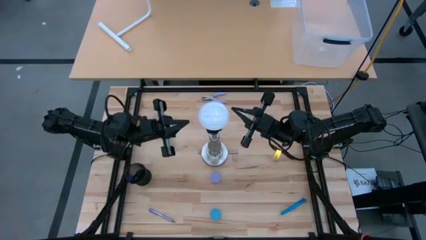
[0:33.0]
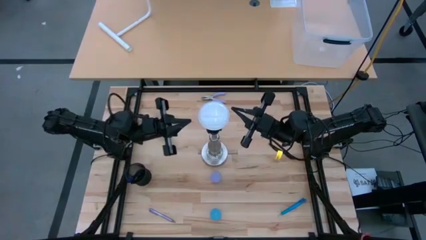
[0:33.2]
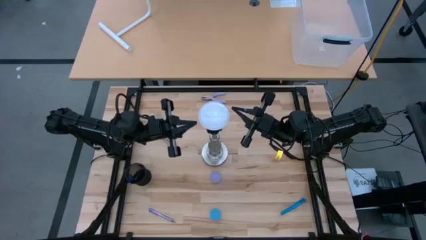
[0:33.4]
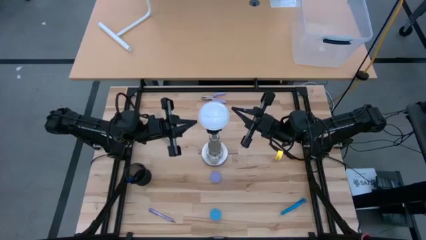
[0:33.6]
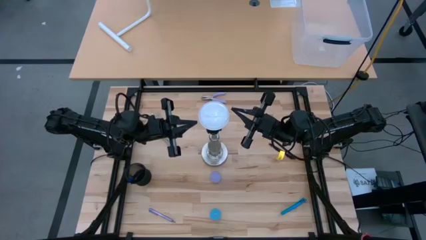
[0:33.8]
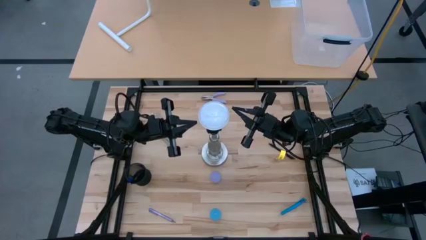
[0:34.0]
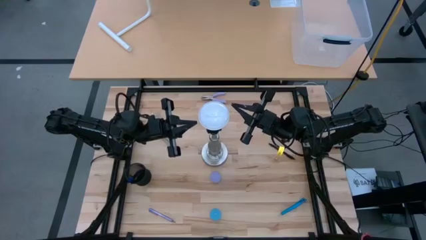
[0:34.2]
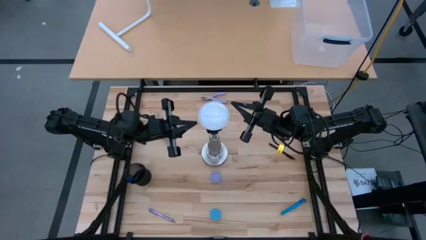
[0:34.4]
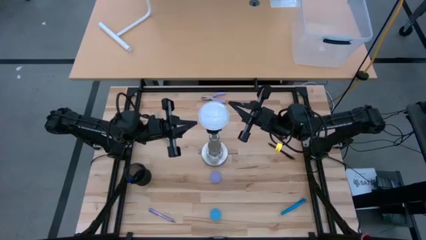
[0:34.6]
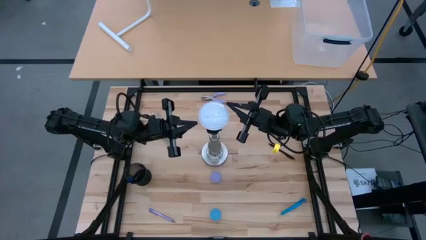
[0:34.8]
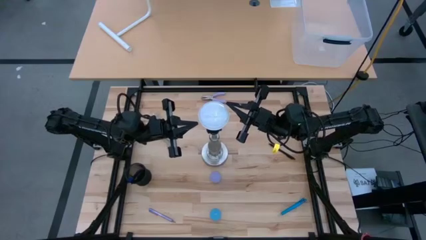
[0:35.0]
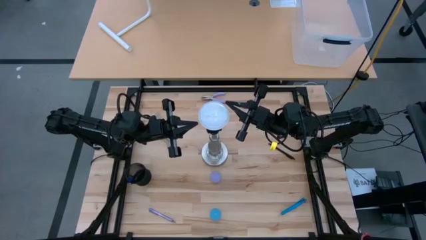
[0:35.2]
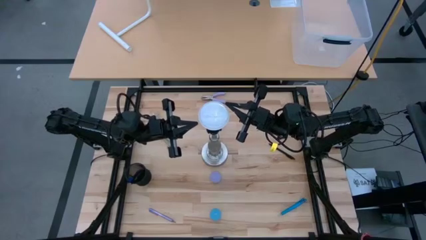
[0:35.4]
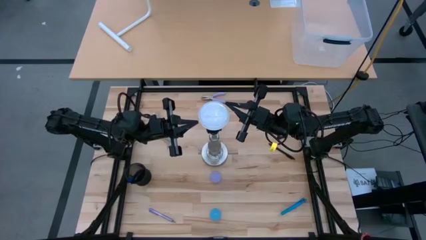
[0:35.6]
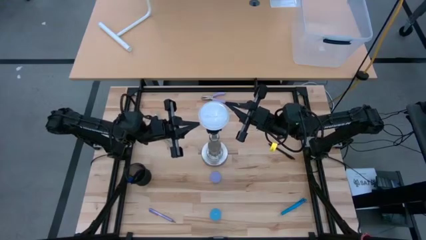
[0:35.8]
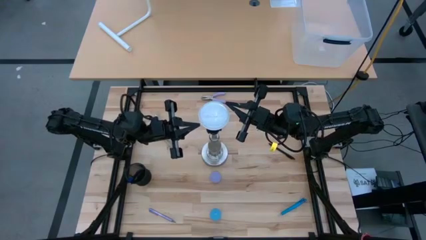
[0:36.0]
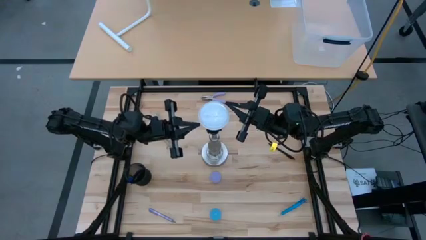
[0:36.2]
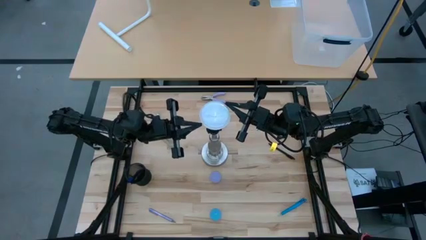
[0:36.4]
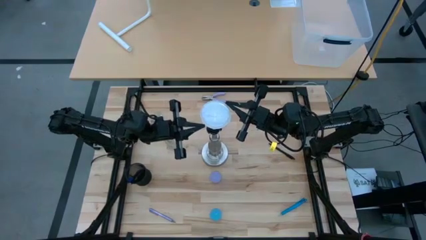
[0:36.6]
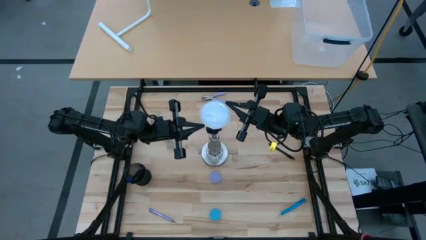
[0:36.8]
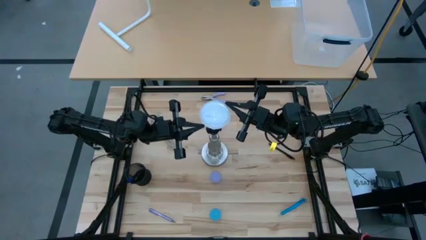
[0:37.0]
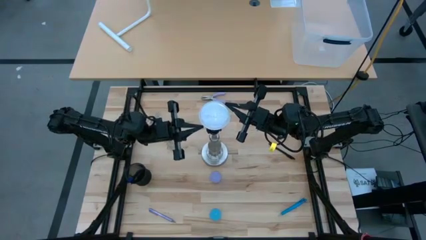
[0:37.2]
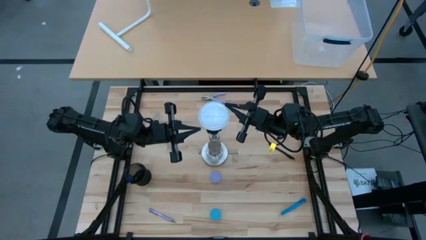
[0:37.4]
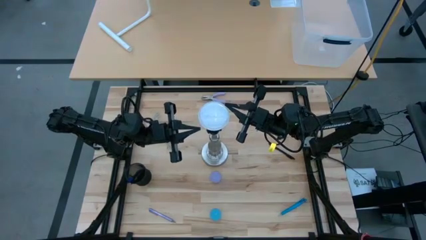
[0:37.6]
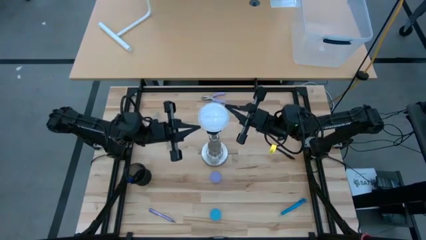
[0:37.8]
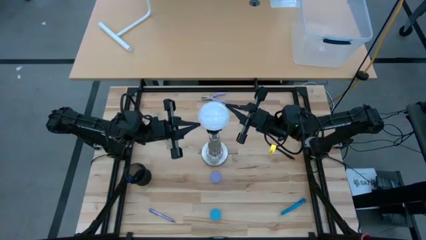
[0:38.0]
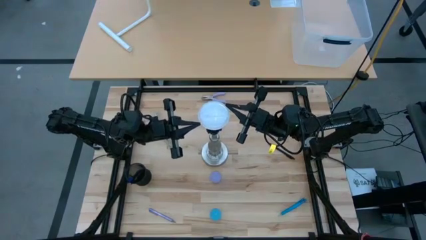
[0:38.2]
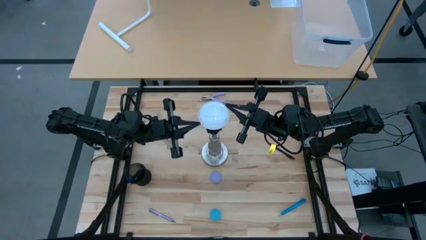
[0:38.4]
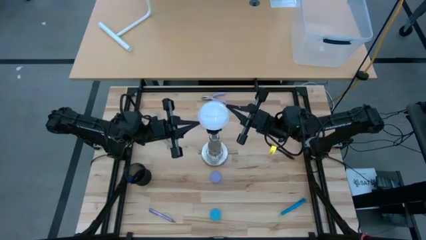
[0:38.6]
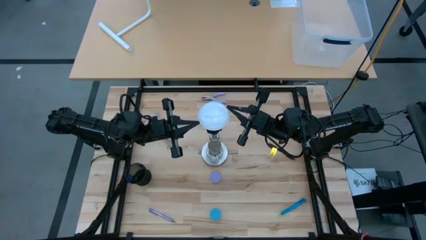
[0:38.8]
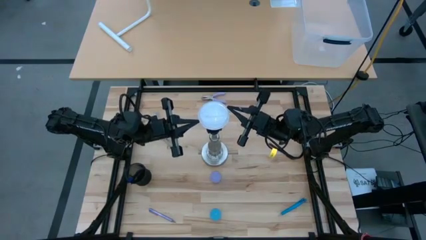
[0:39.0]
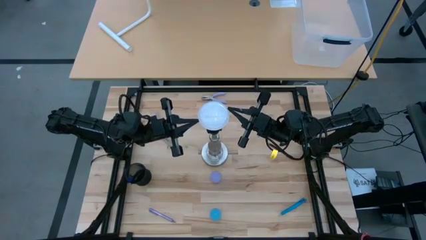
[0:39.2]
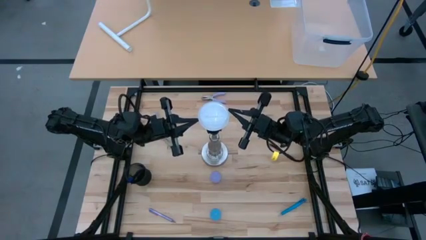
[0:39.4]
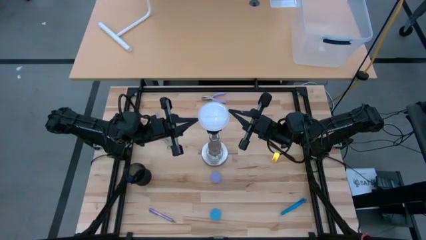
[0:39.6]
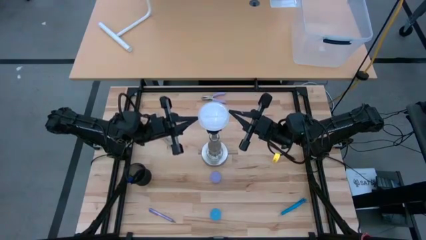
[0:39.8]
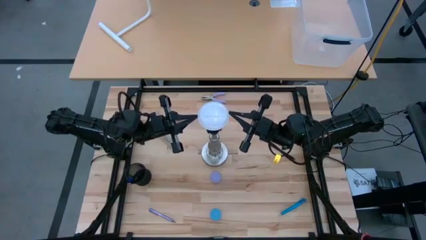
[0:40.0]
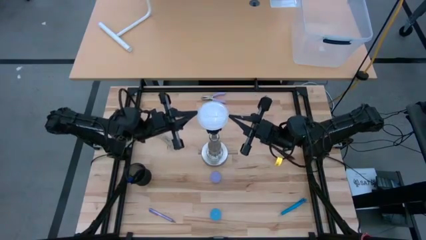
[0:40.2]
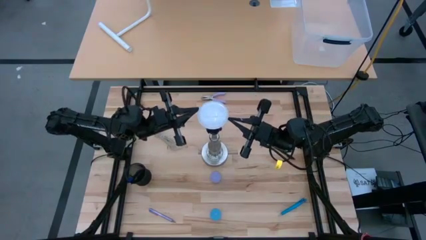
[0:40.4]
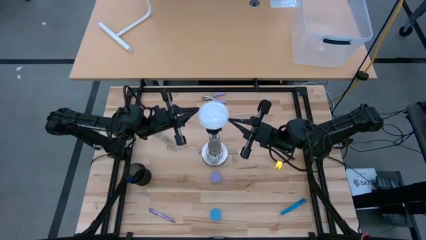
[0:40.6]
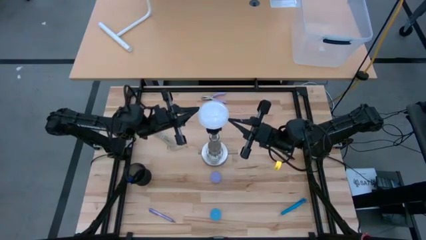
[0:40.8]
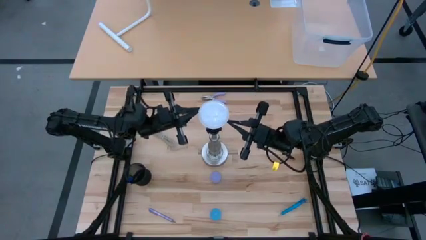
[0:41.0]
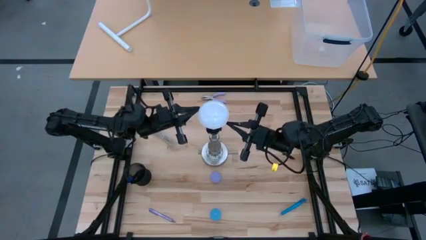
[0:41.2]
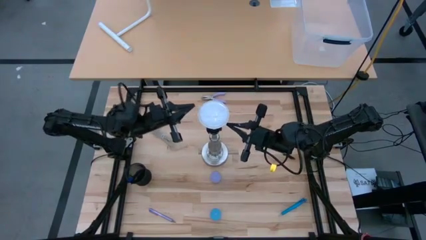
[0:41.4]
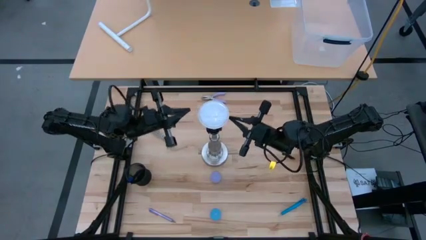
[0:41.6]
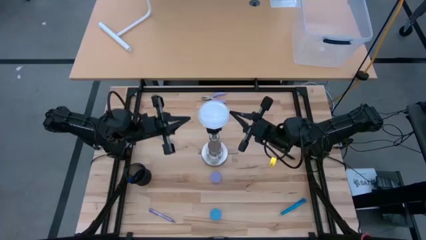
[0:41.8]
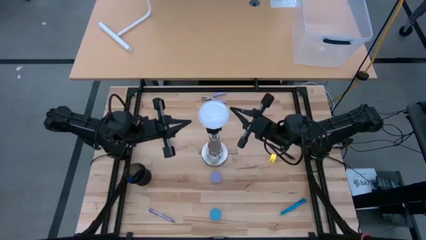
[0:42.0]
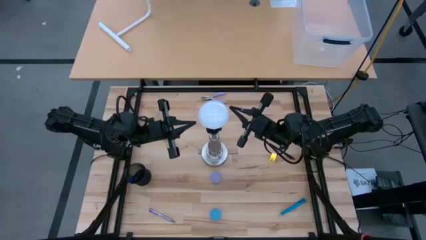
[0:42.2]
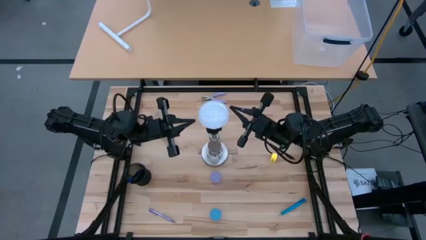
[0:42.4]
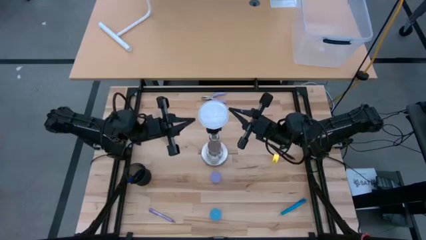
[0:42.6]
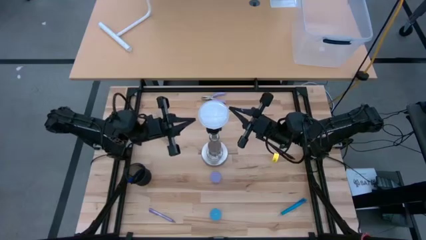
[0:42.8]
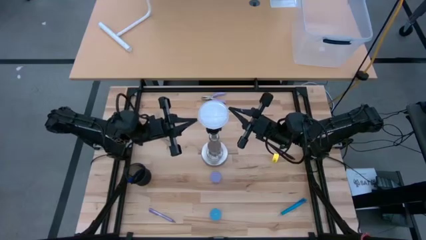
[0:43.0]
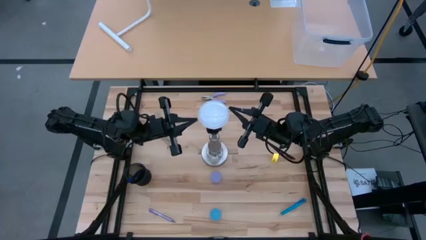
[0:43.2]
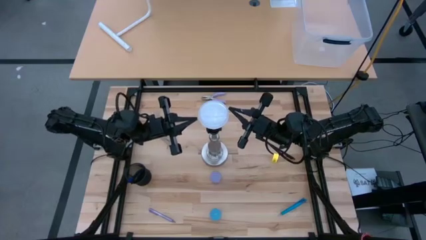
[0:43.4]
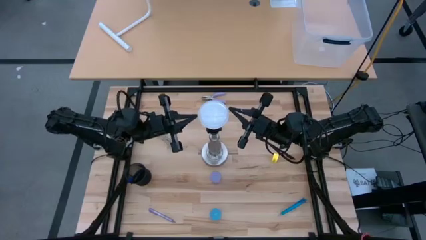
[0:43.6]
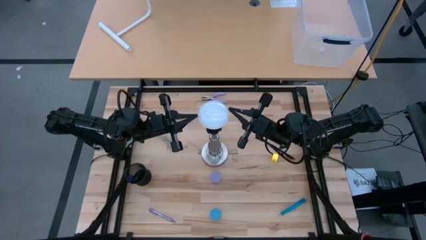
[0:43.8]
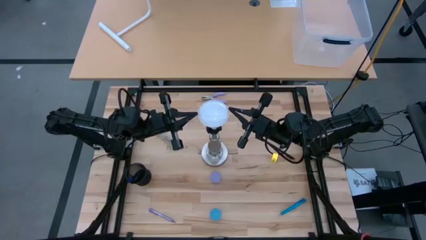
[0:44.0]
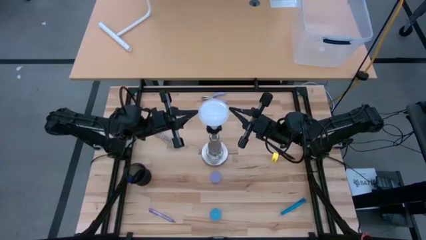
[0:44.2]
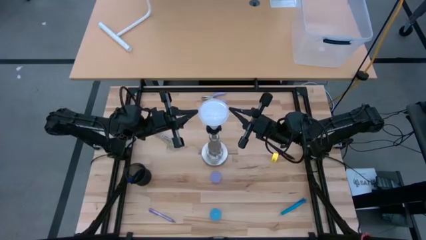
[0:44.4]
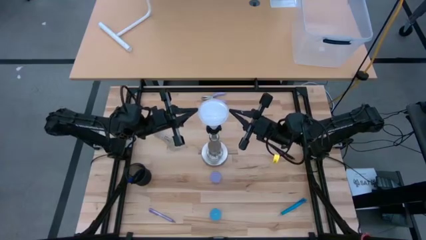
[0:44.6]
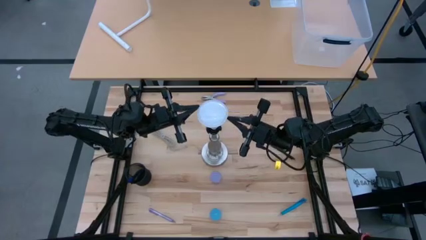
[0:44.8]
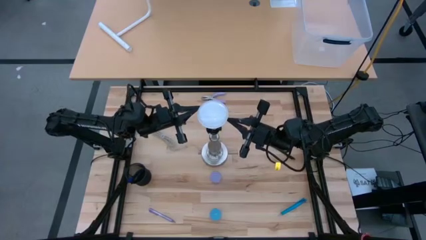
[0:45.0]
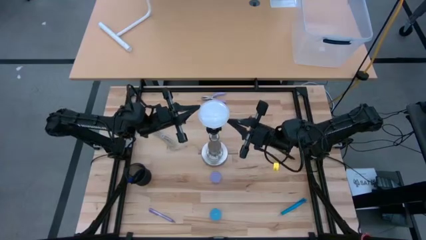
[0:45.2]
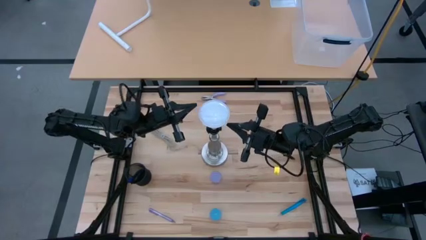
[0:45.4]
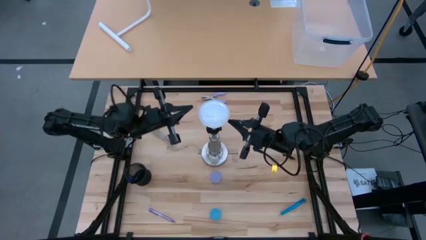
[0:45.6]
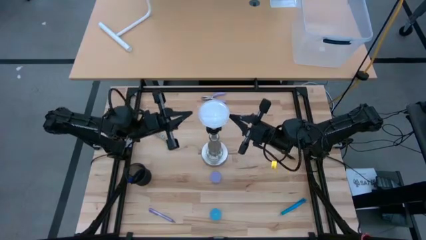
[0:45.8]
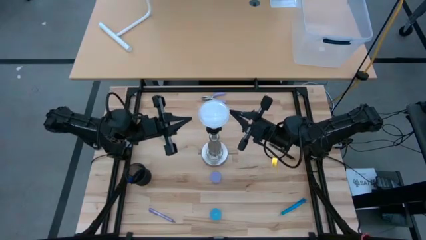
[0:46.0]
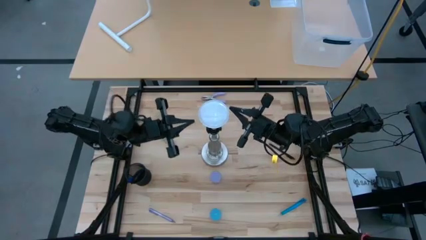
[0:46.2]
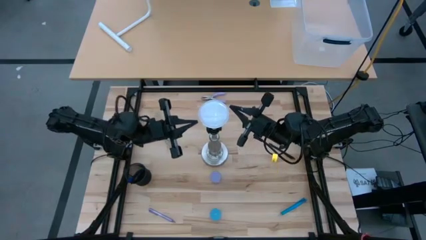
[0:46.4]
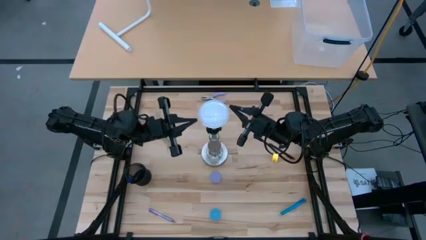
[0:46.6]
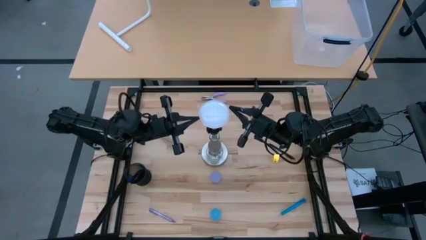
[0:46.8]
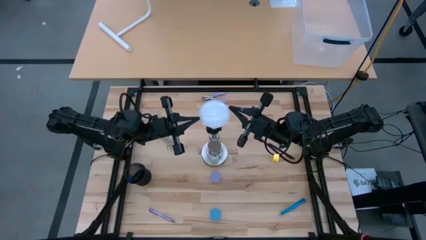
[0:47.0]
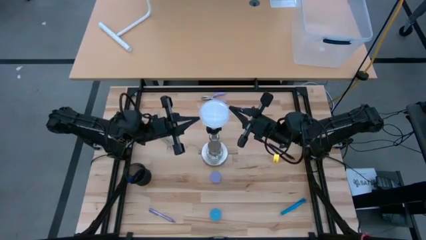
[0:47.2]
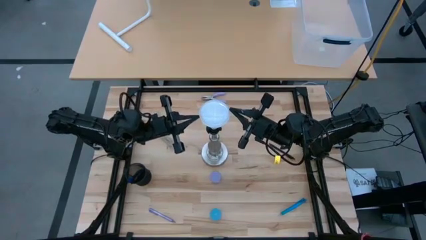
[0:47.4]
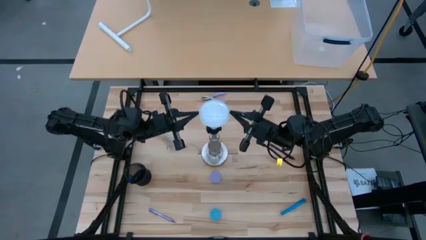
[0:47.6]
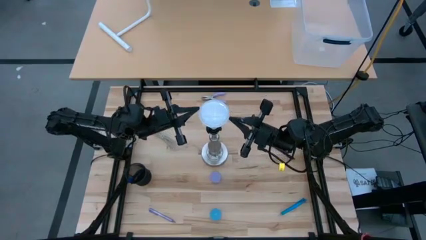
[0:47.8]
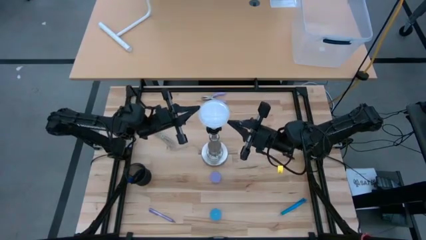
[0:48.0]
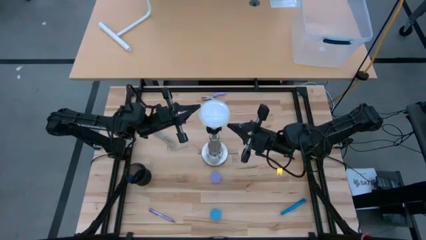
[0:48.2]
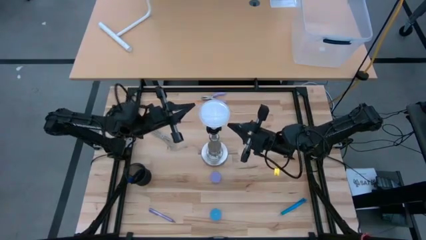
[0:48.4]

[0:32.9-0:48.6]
Task: Screw lightbulb
Insert the lightbulb into the silver lamp socket
